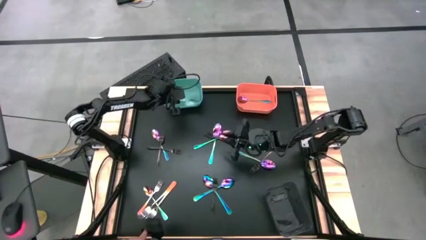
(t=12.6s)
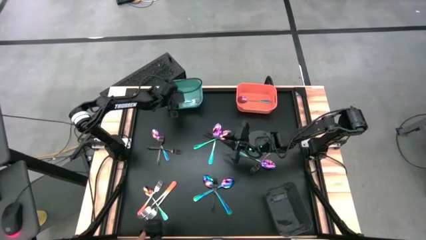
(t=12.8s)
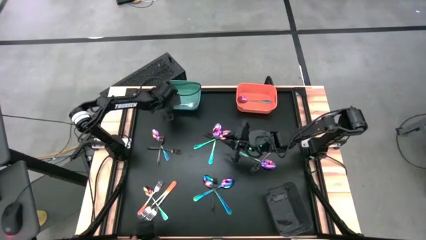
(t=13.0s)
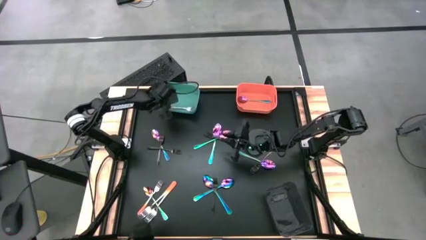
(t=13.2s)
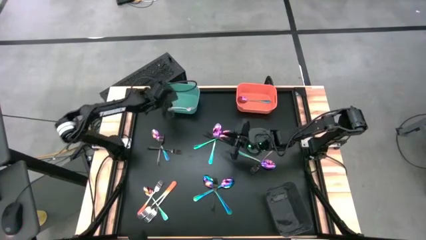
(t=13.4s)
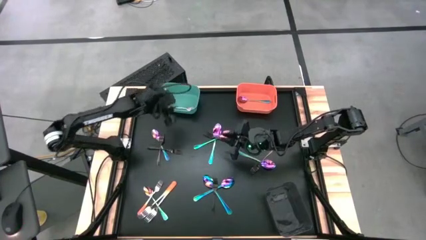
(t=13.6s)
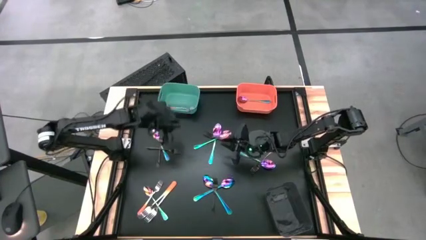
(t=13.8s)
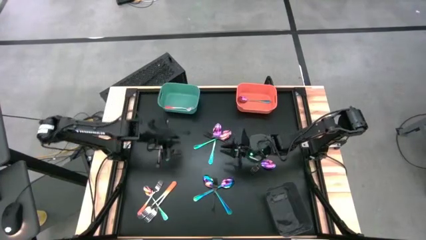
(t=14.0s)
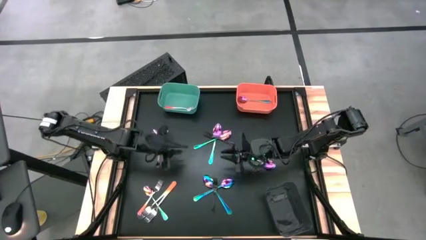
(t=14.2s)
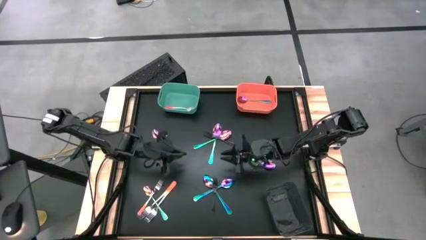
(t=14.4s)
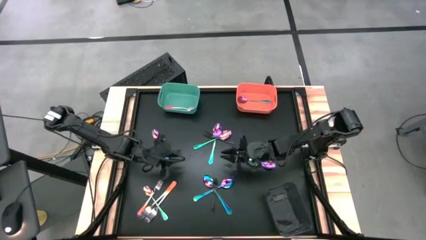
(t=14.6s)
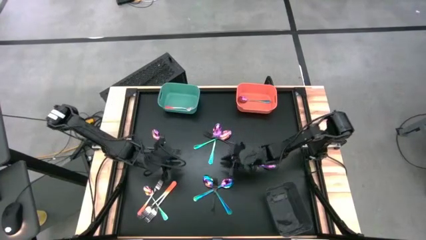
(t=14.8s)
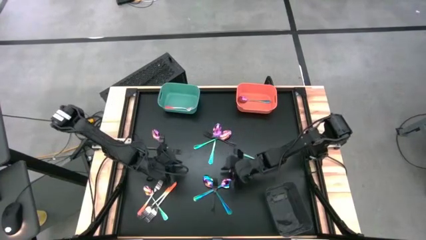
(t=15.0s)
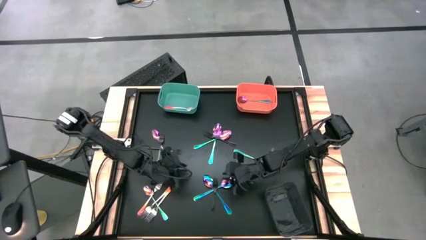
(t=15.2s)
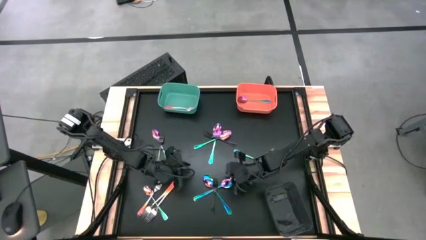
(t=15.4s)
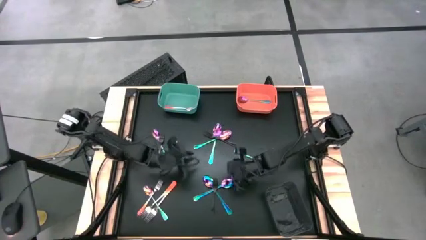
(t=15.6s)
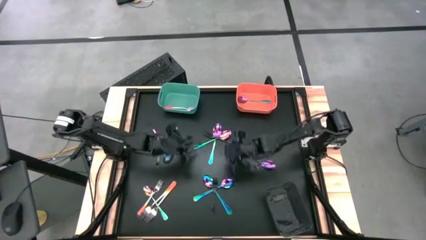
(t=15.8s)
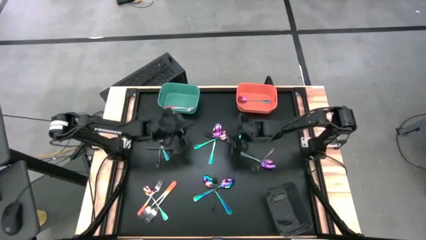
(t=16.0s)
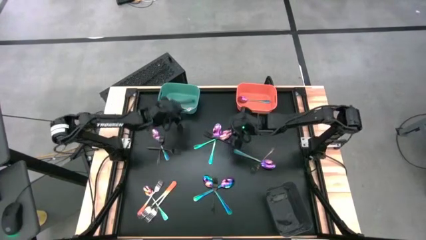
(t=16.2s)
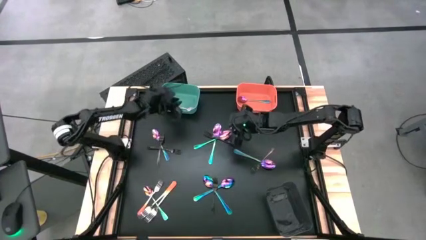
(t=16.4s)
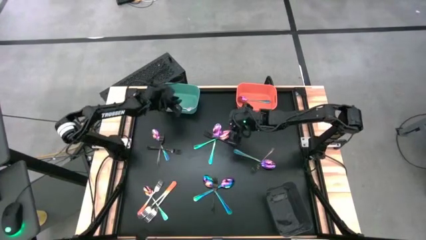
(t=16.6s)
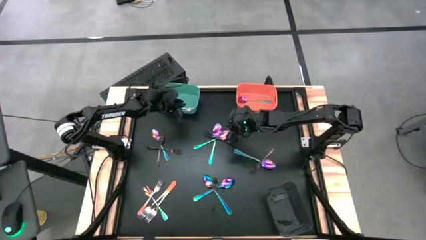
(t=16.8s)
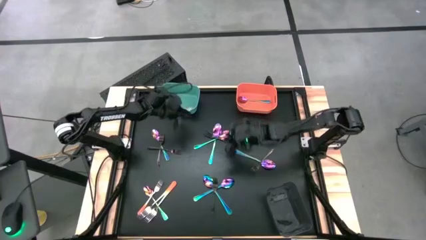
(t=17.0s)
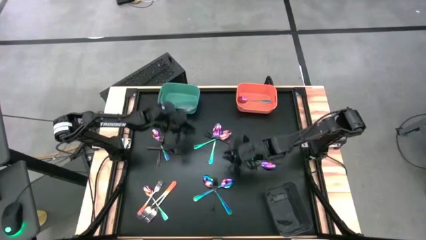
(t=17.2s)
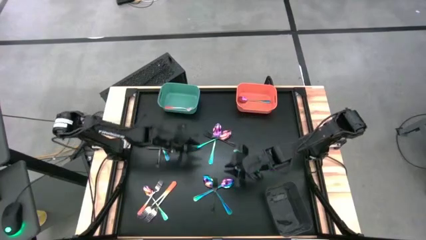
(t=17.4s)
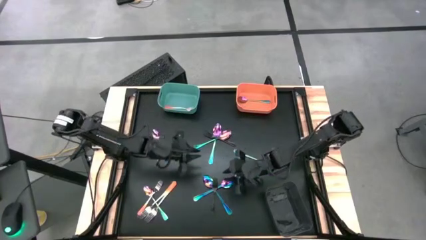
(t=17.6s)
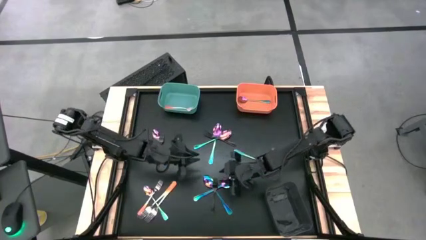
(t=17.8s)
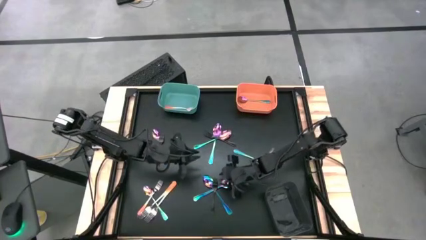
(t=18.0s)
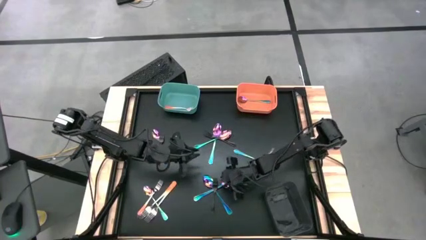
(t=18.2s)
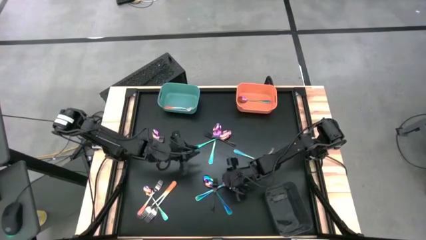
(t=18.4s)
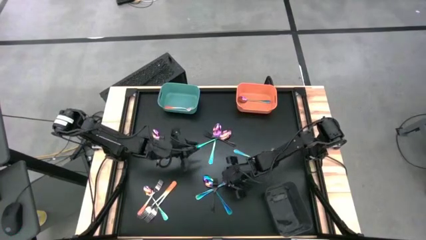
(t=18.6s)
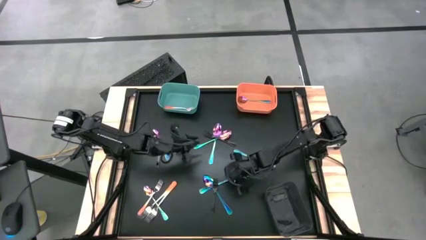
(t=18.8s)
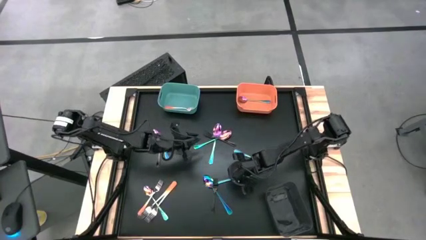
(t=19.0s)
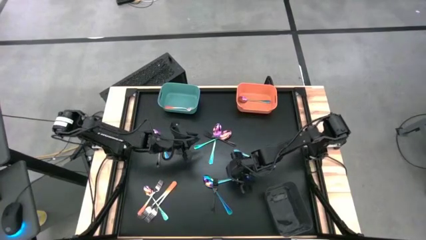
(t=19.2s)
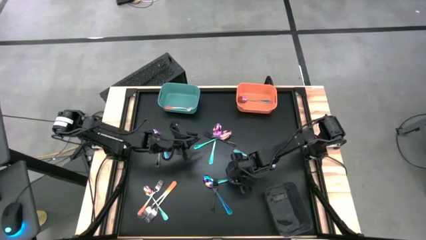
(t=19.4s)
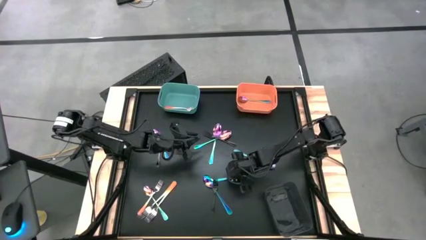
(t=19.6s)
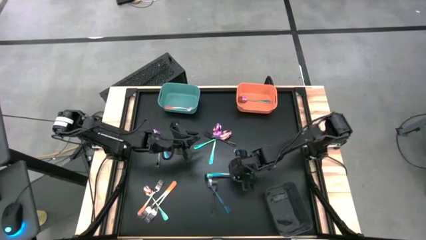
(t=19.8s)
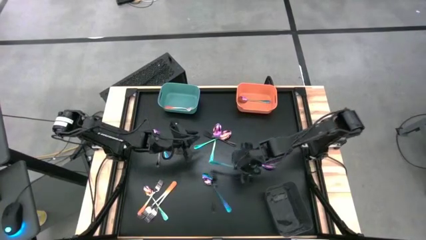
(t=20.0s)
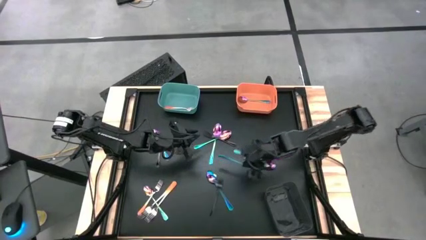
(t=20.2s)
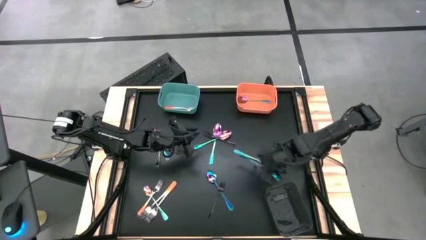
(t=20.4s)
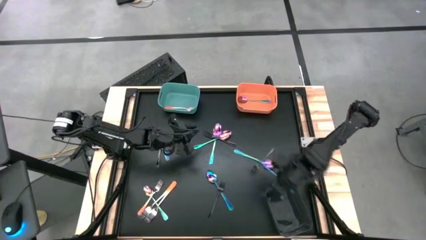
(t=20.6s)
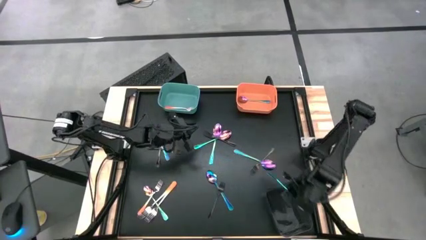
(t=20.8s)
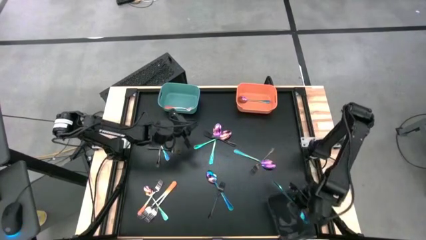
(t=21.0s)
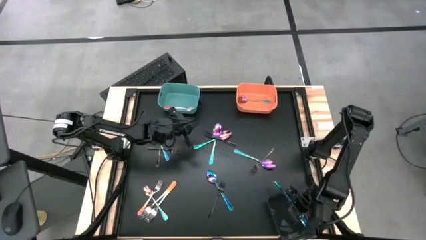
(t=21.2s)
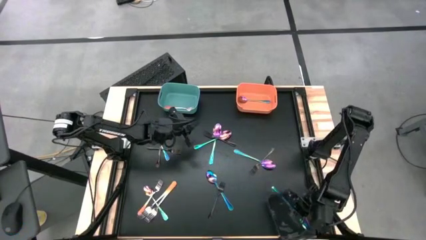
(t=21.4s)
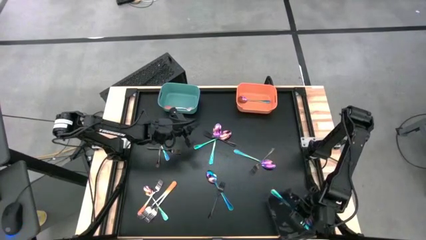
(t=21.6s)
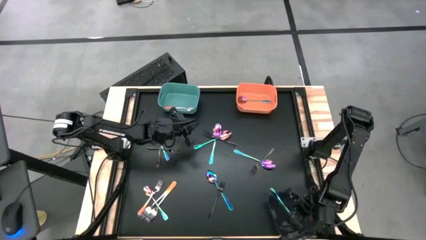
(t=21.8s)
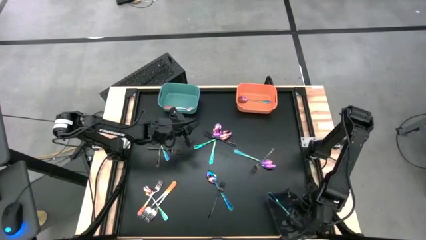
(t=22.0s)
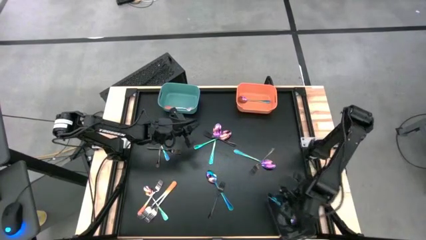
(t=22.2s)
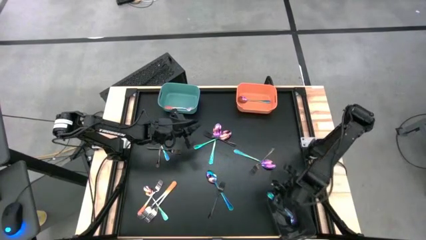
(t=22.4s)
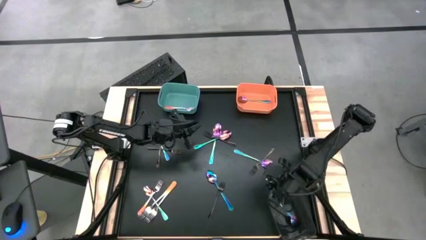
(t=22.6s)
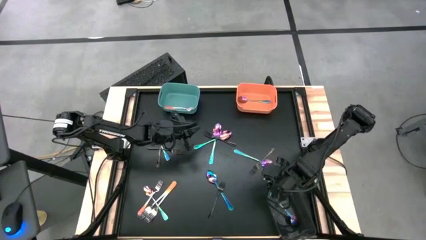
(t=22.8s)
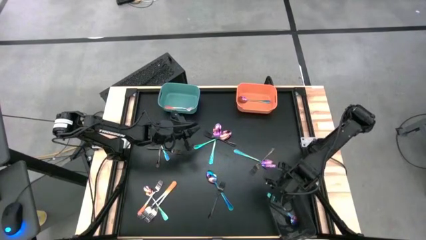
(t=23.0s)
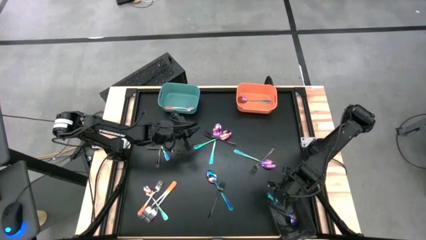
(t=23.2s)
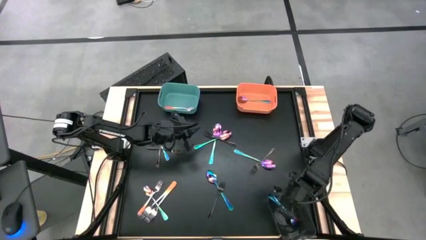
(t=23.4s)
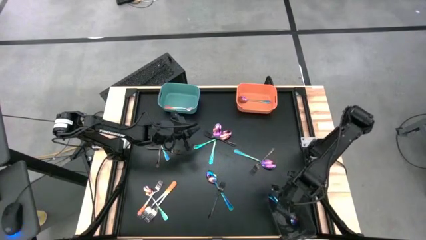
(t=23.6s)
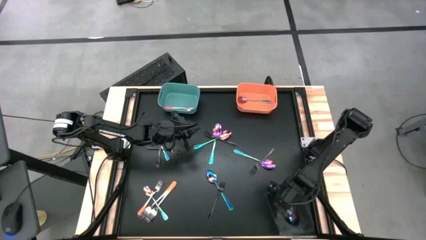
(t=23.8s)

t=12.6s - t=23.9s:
Task: Sort silverware by color (type)
Put the purple spoon into the black bin

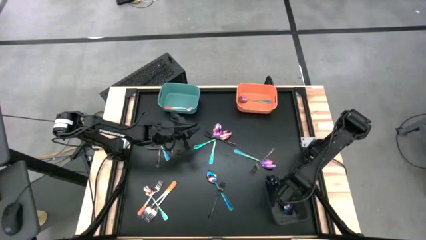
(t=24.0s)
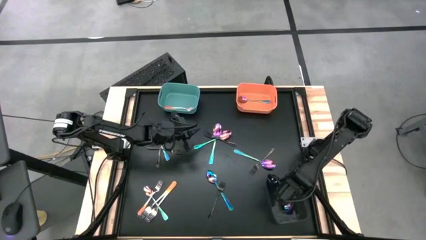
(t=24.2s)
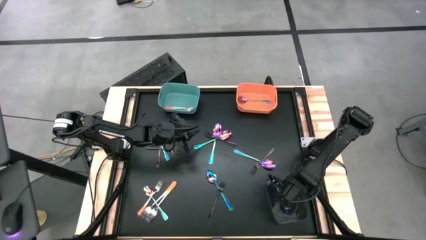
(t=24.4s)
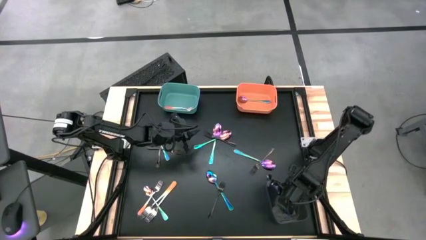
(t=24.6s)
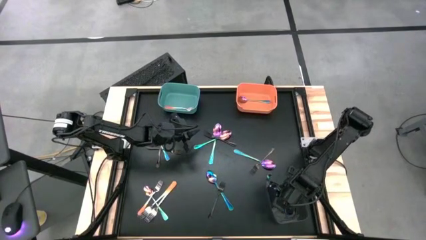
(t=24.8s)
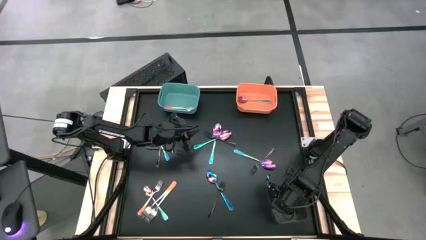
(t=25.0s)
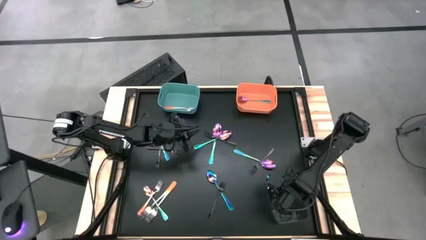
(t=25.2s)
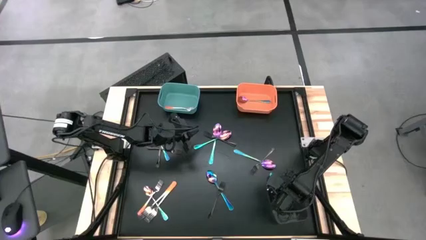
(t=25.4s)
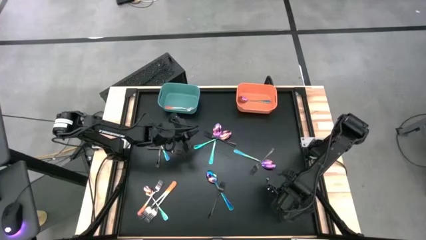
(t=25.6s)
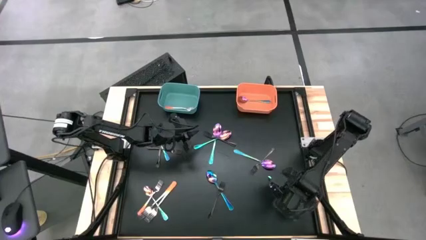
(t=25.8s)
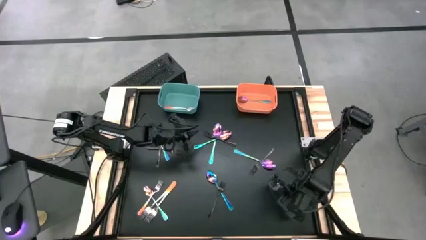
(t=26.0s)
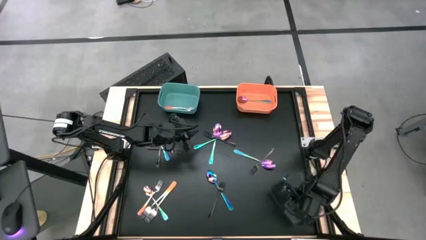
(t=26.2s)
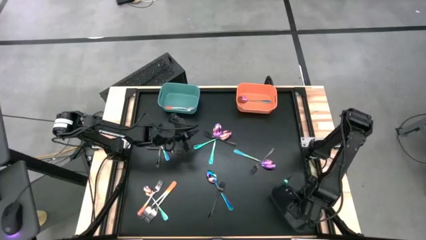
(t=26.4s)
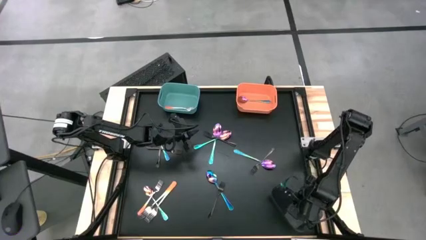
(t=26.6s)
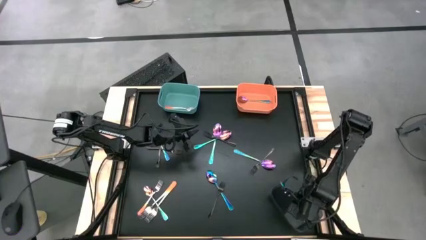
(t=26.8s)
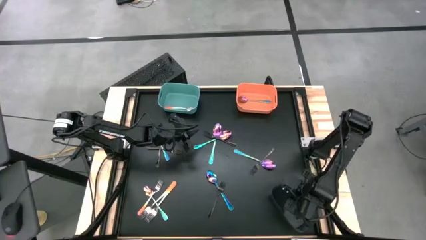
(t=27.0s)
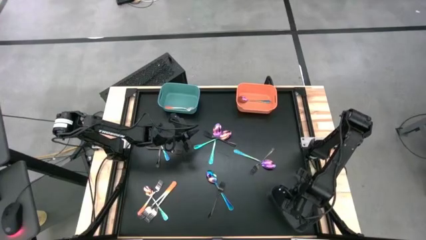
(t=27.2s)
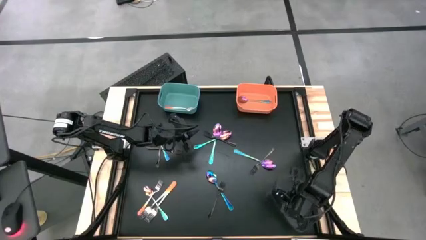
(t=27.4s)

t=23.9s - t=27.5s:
Put the purple spoon into the black bin
